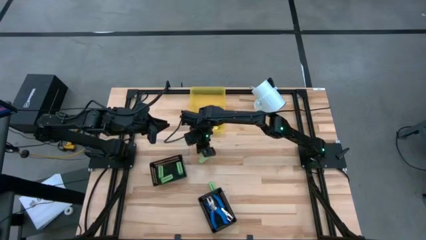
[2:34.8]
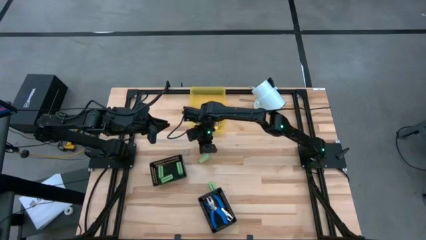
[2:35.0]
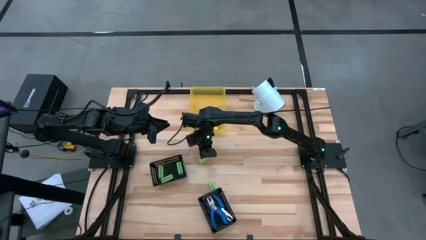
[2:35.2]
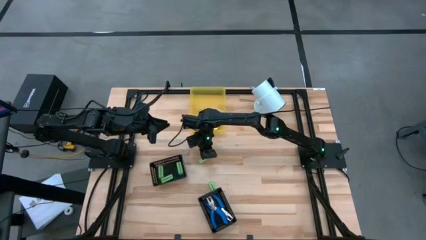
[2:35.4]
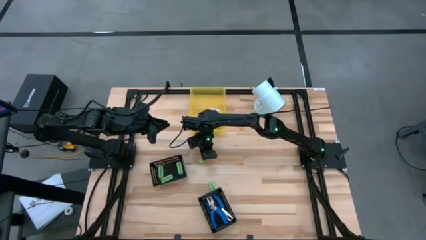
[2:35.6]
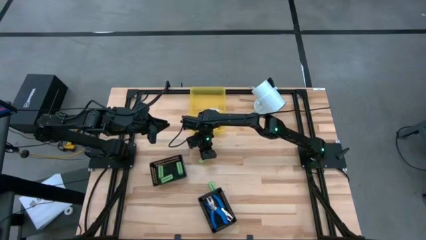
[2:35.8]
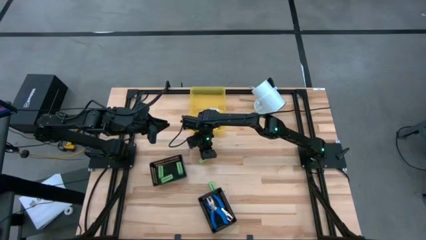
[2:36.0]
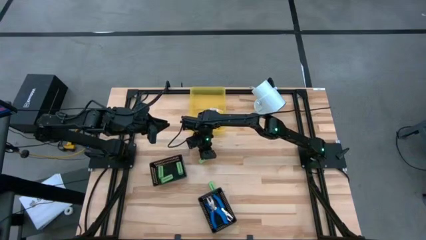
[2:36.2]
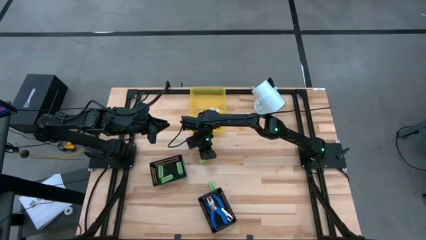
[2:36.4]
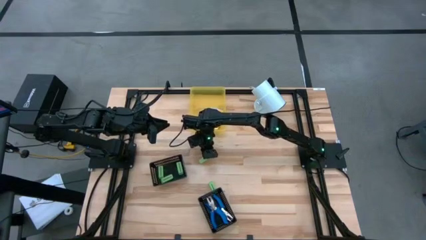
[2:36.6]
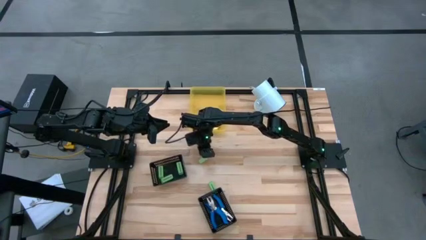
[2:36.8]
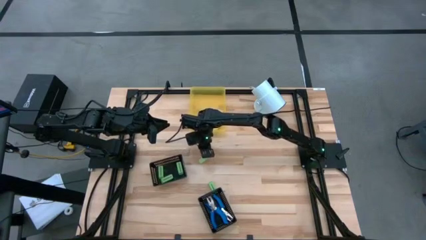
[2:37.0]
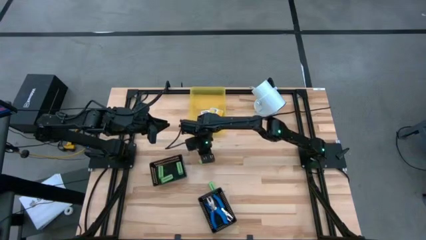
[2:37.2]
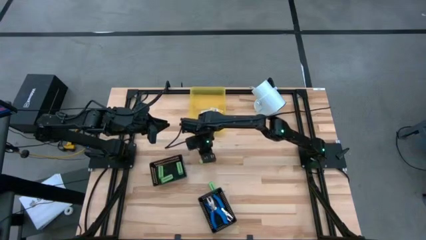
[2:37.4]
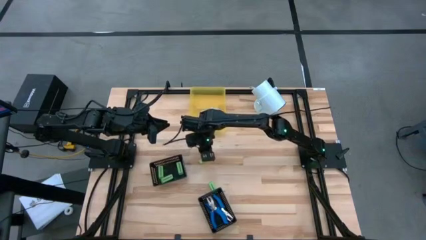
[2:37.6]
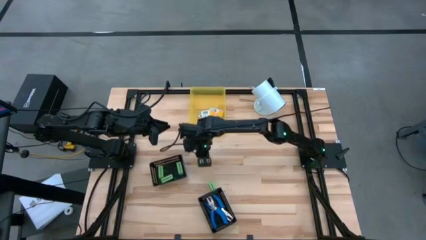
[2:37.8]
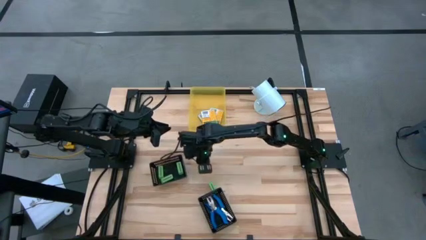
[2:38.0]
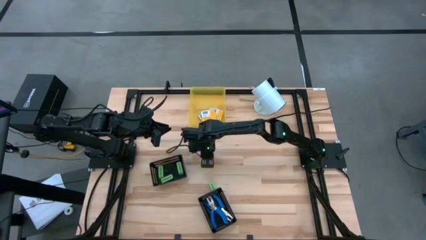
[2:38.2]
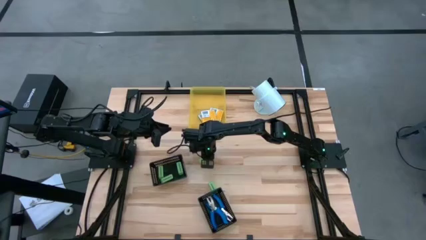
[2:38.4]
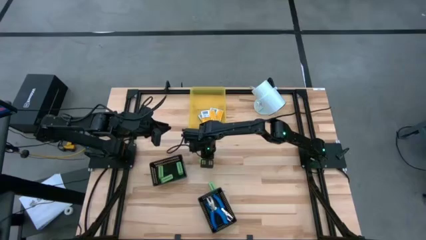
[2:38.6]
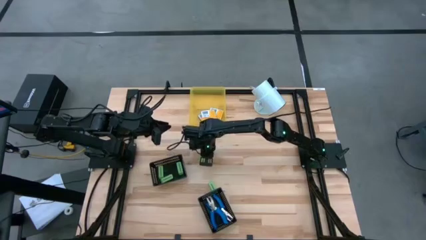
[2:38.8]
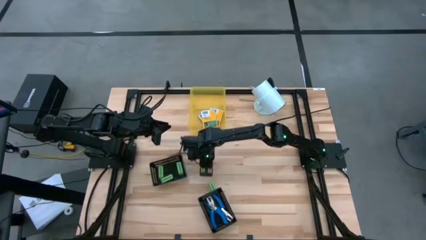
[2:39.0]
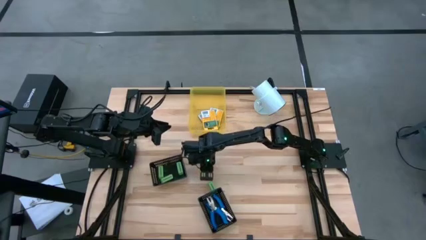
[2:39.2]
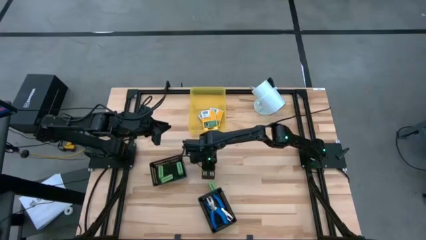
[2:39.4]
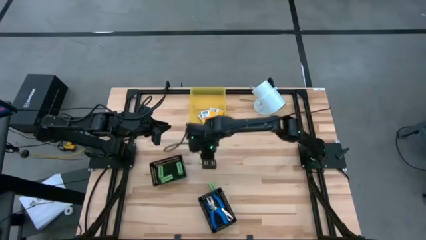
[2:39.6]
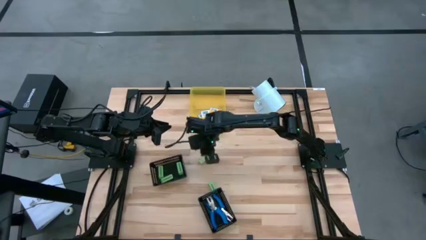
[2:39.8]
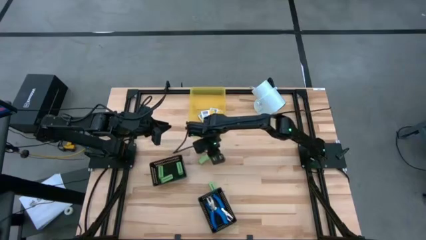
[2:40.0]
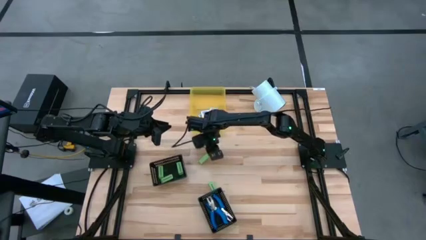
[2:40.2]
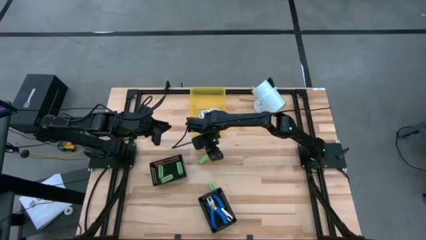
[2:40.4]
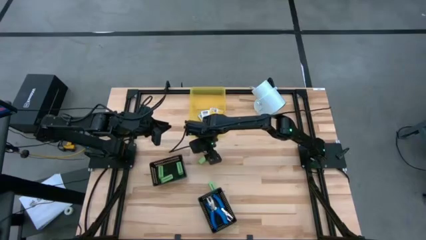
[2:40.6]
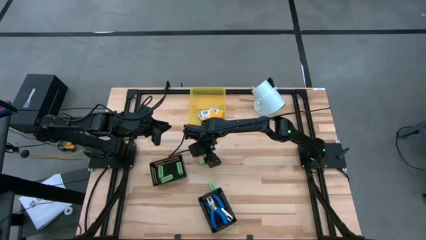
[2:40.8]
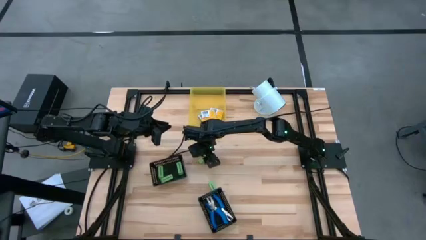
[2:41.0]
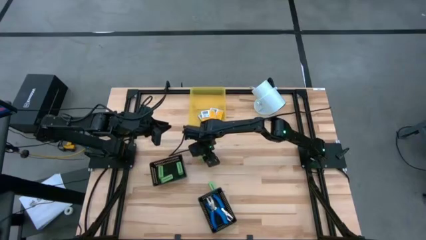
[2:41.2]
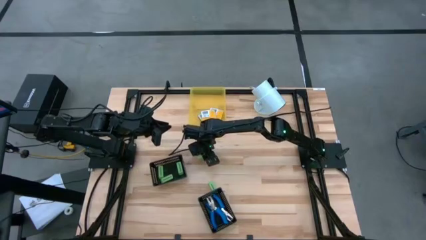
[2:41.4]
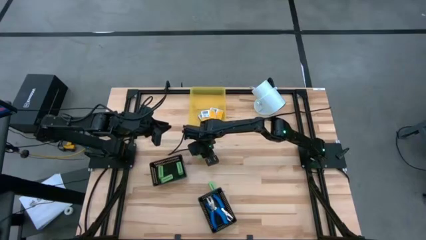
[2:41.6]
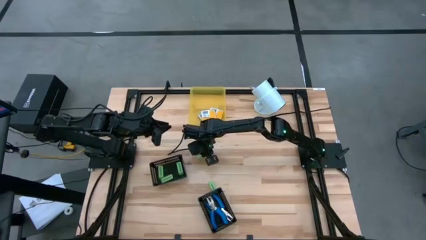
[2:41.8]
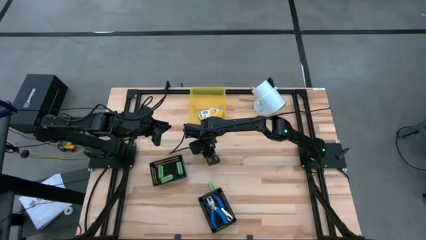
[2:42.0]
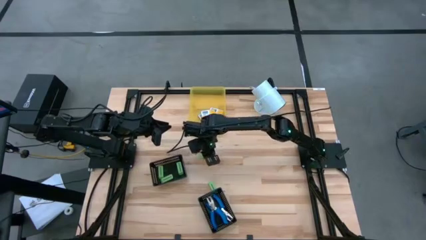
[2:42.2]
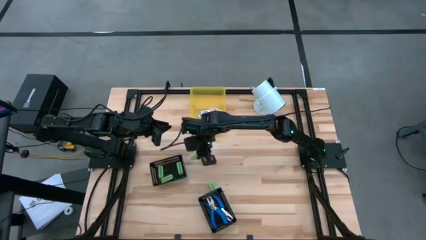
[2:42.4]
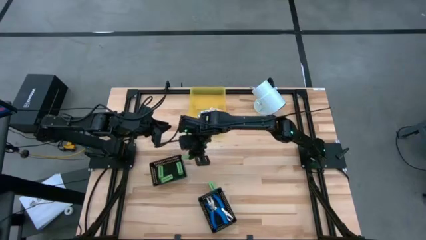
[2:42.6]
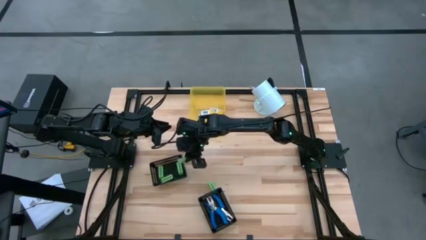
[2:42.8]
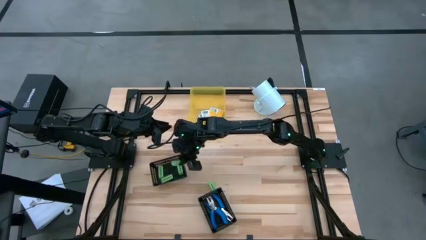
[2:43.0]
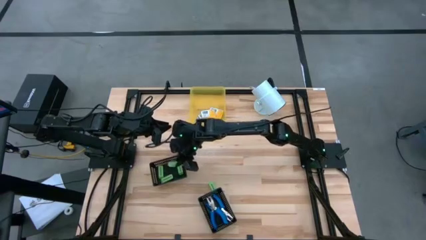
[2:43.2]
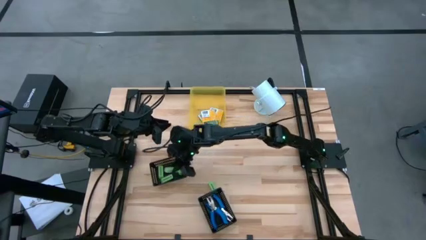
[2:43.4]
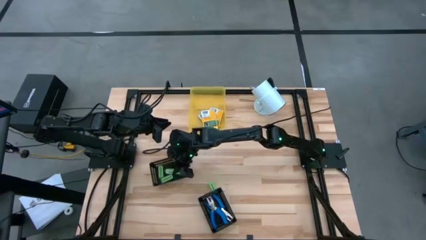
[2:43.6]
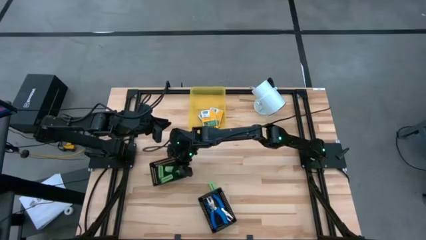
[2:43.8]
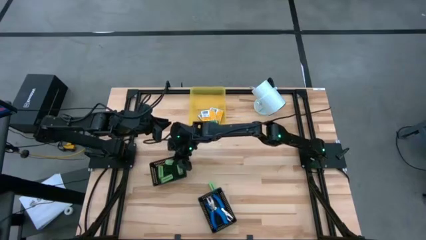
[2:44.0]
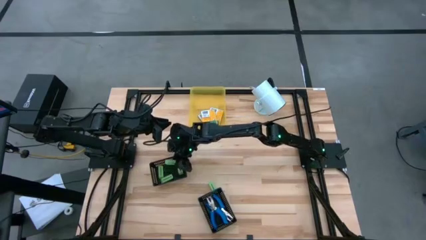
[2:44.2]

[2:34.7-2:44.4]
Task: Pick & Place School Supplies
Put the green eraser into the left black bin

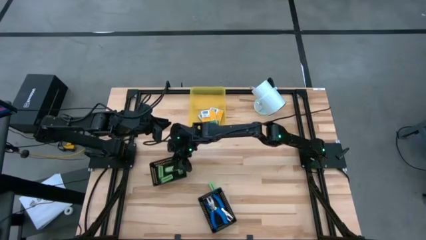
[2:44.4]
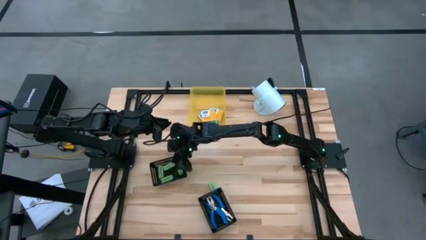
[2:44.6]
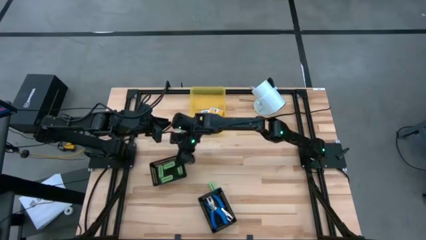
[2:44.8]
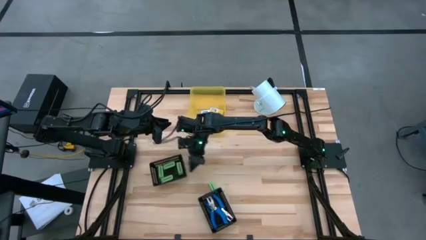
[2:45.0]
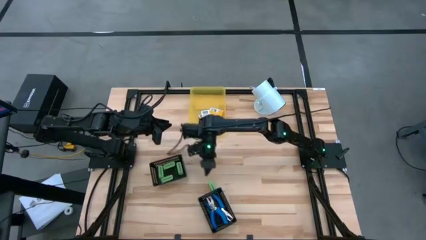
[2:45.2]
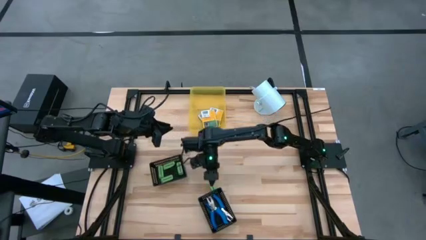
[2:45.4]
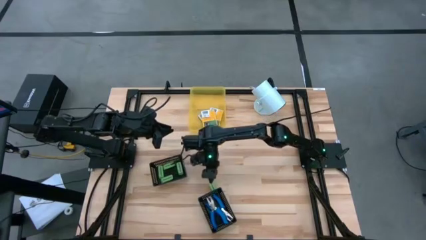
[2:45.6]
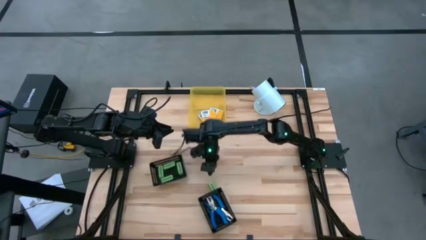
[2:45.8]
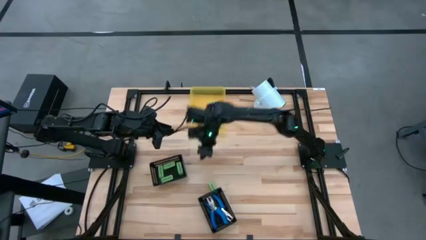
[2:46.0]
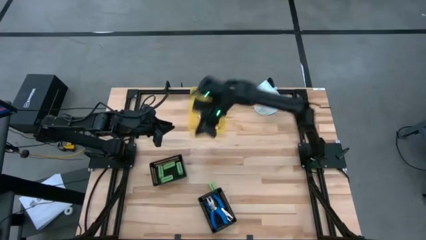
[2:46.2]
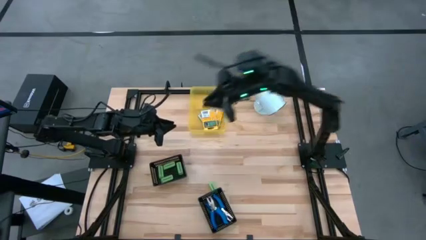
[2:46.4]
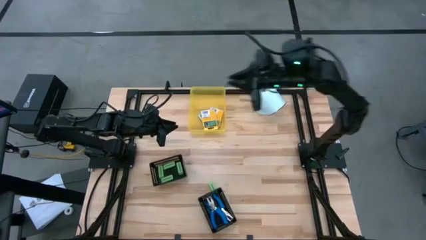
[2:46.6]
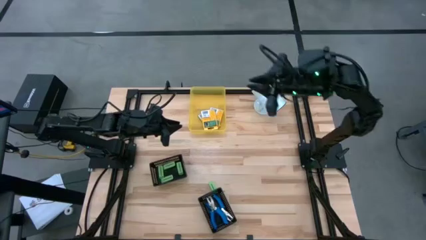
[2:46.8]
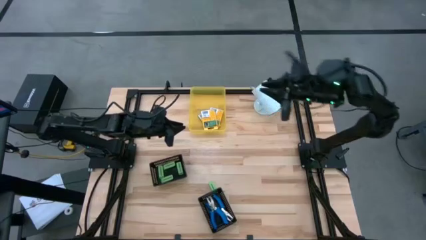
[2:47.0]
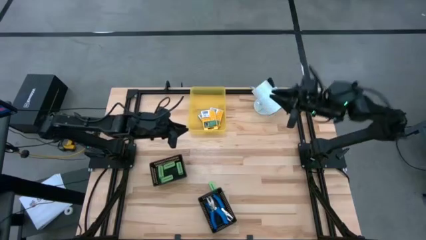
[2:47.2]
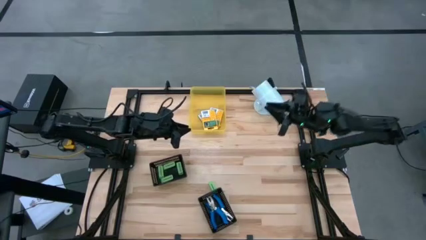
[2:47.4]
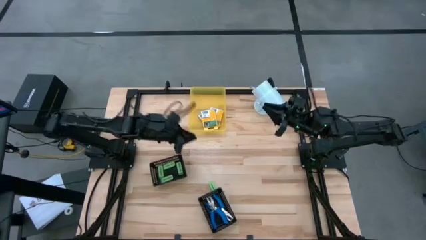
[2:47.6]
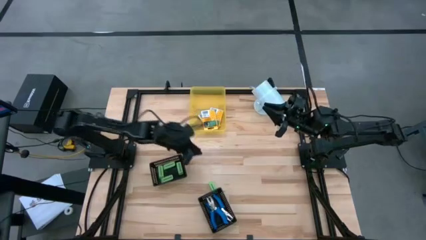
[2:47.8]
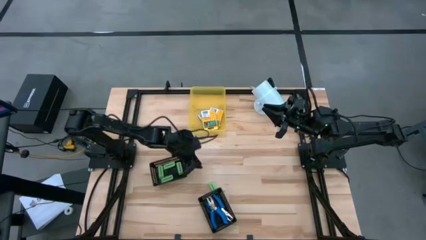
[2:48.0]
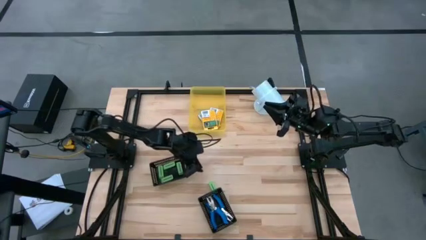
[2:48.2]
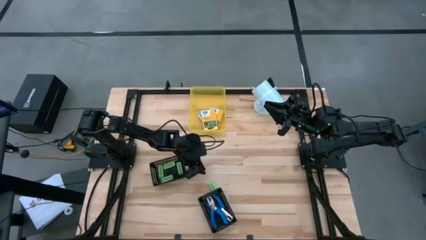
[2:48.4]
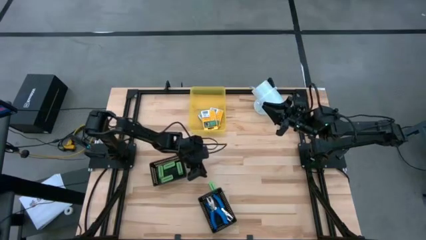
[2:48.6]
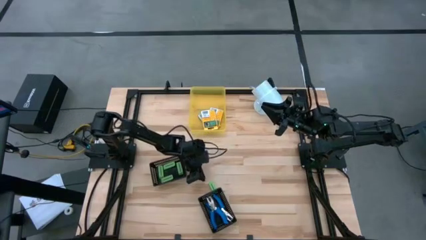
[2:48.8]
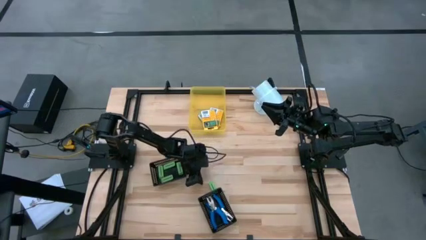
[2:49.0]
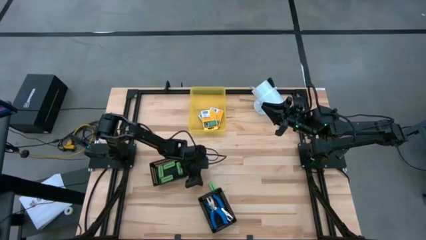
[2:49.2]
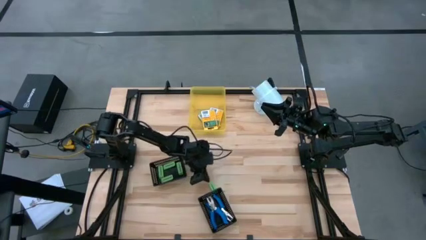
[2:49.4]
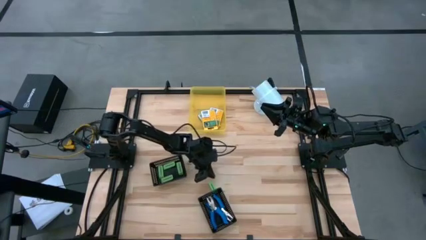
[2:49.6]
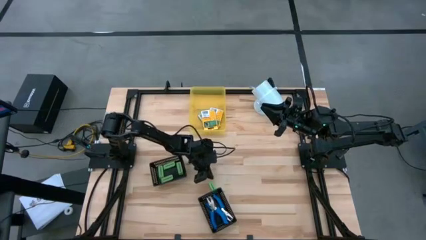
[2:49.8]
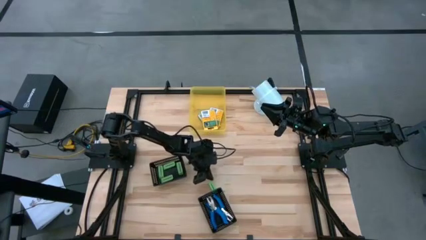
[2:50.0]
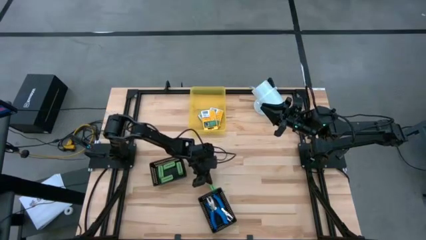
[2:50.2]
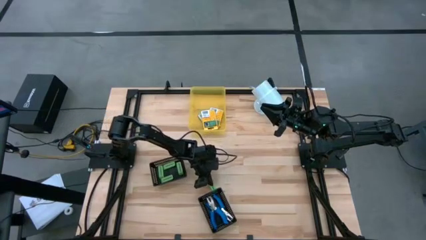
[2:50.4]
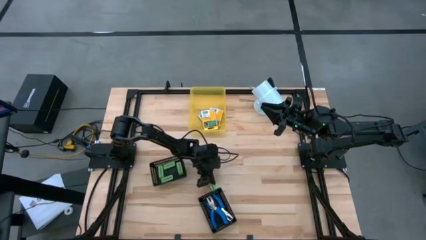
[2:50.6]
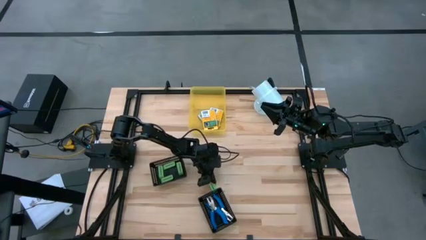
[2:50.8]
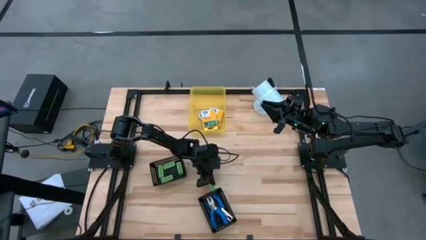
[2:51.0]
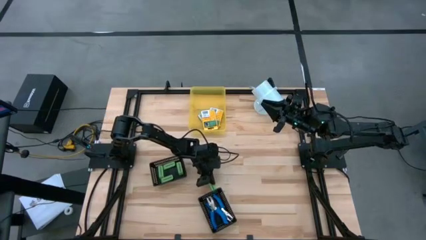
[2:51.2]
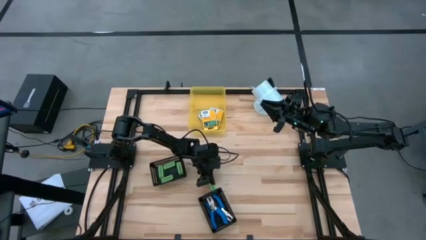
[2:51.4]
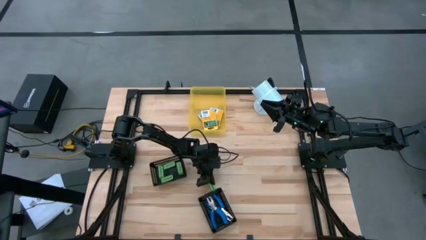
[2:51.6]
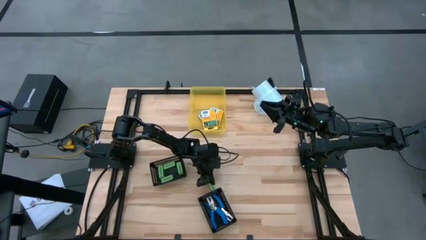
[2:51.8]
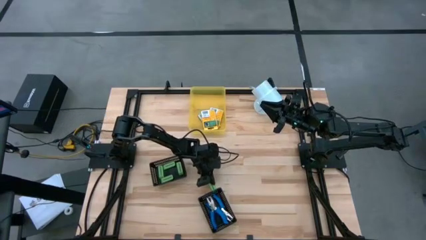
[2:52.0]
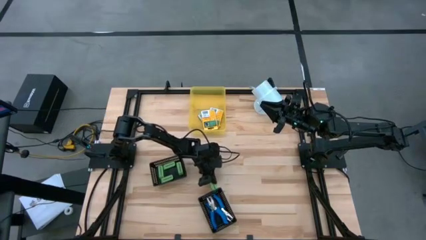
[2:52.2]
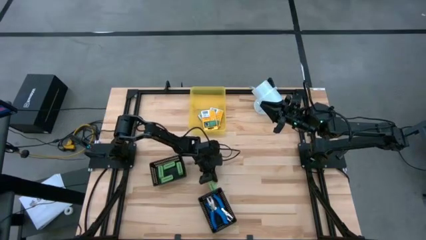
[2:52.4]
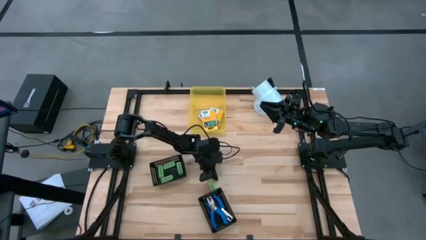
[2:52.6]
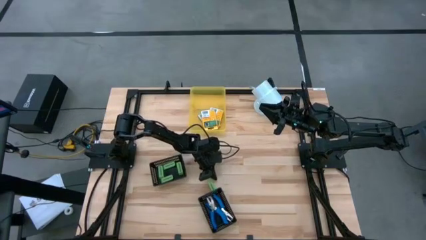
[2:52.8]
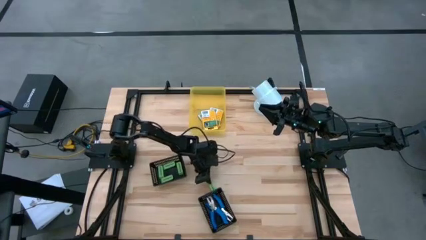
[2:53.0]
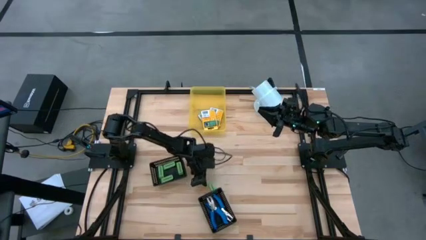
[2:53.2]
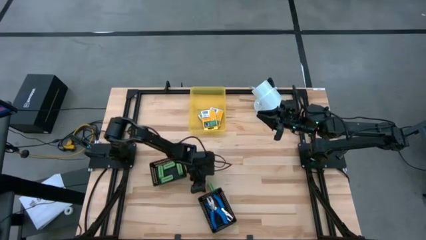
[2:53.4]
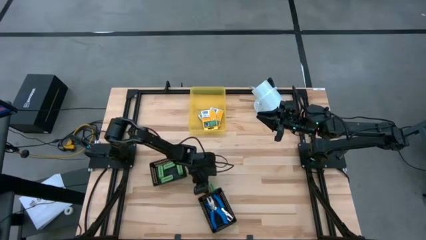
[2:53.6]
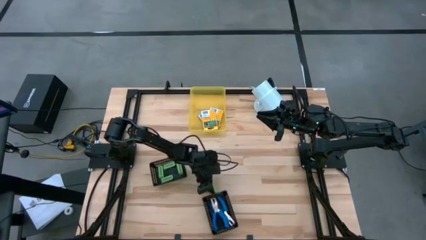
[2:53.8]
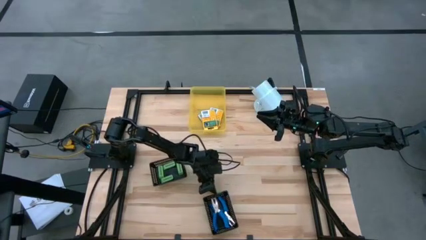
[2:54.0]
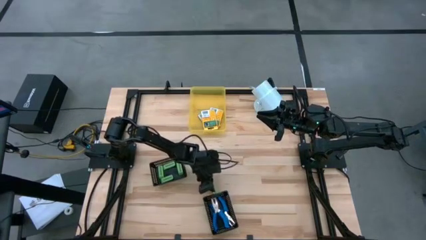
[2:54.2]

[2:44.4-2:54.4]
Put the green eraser into the left black bin
